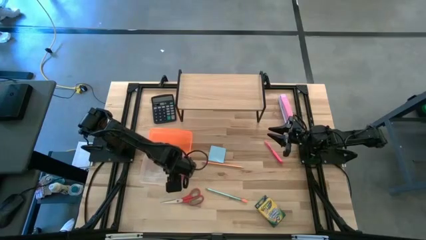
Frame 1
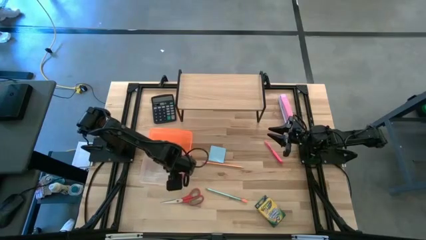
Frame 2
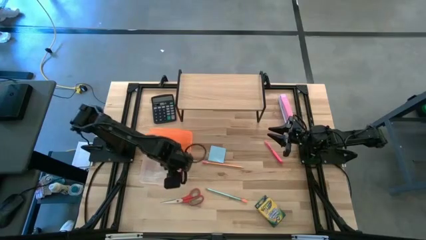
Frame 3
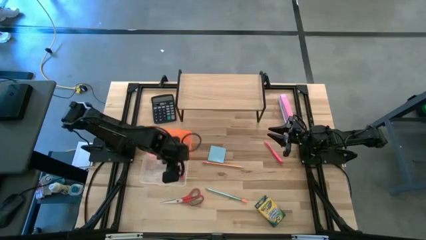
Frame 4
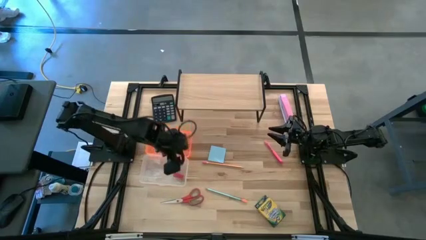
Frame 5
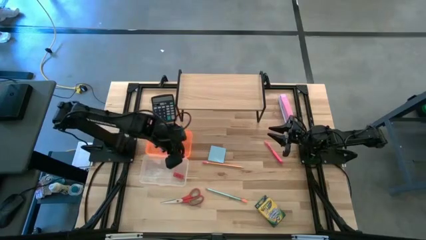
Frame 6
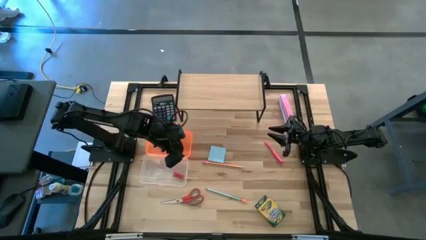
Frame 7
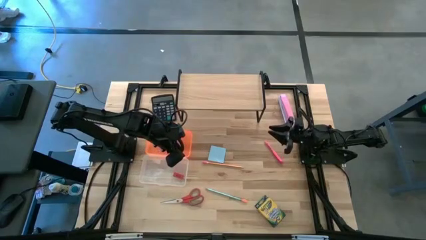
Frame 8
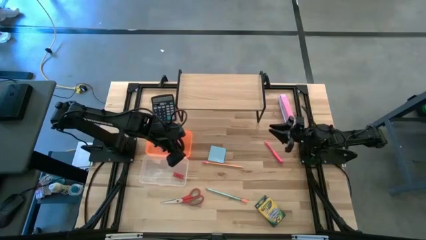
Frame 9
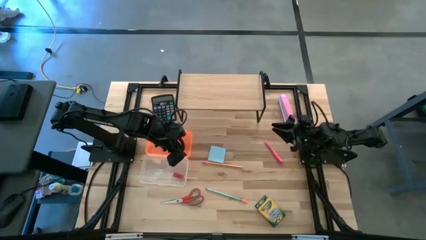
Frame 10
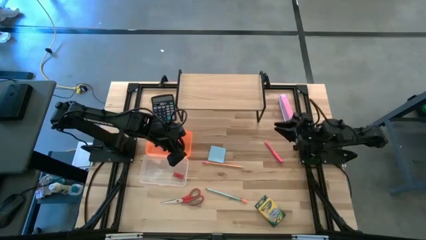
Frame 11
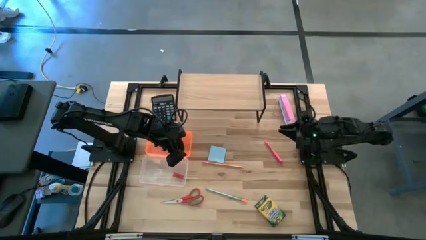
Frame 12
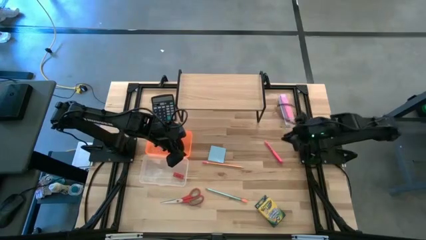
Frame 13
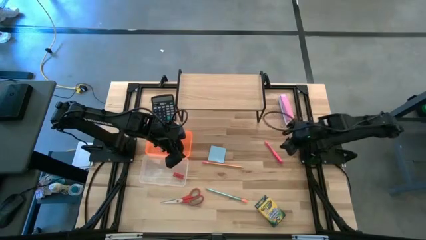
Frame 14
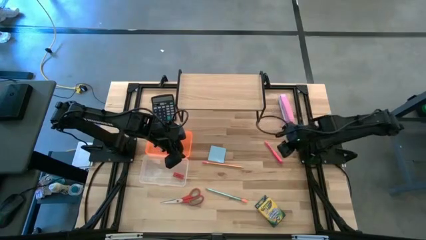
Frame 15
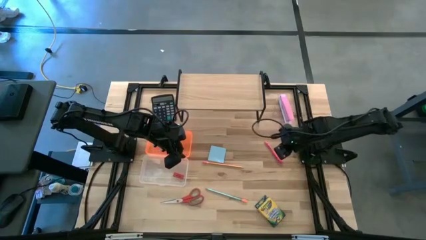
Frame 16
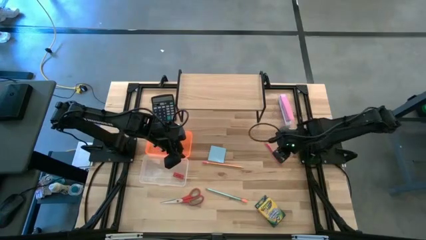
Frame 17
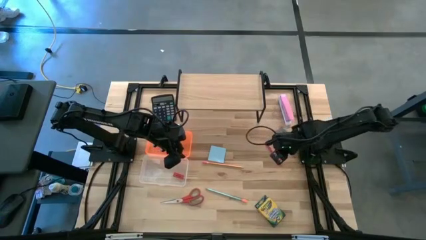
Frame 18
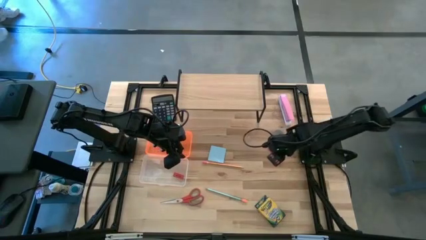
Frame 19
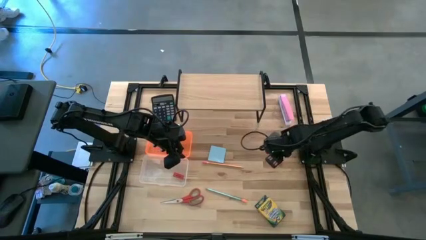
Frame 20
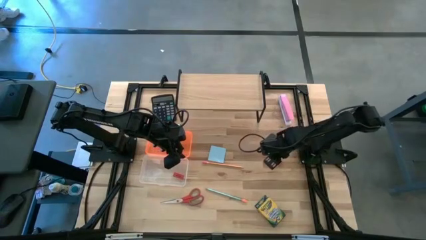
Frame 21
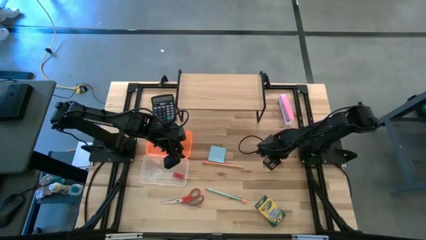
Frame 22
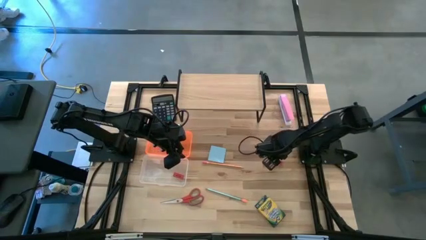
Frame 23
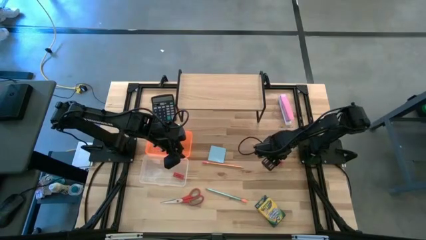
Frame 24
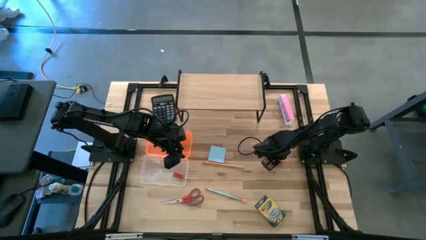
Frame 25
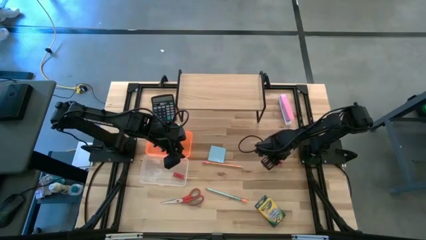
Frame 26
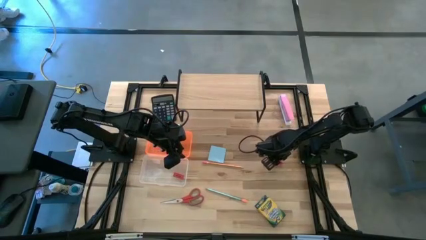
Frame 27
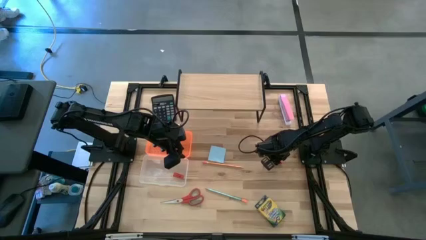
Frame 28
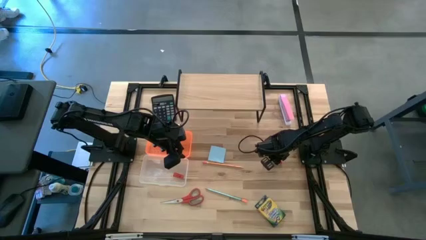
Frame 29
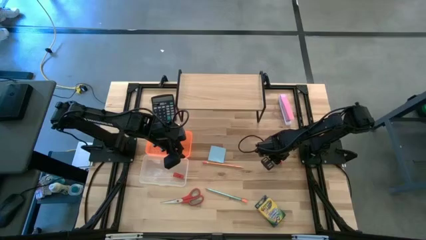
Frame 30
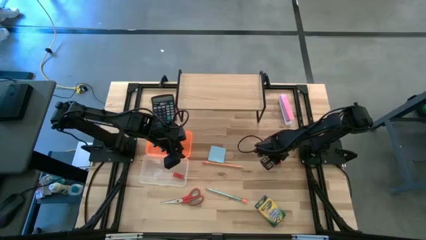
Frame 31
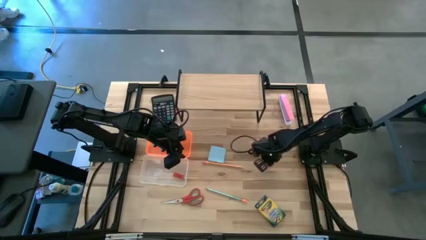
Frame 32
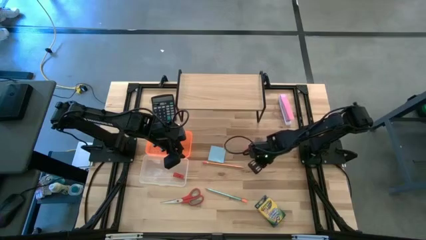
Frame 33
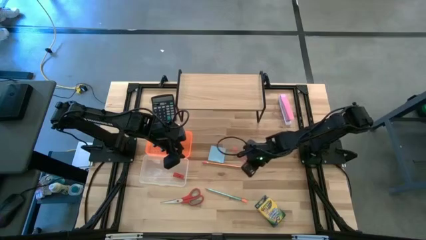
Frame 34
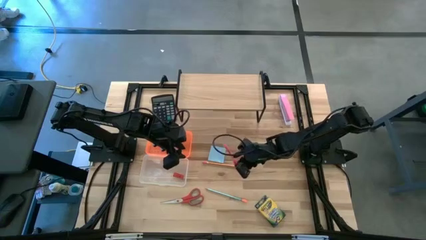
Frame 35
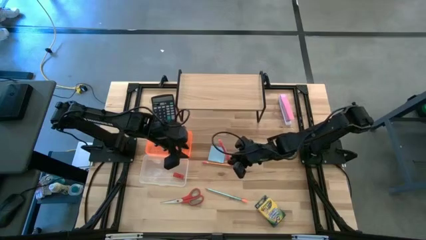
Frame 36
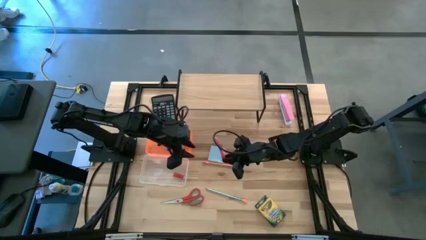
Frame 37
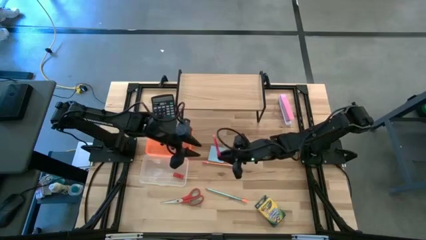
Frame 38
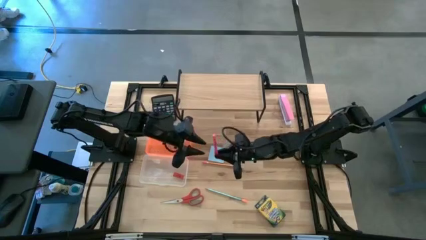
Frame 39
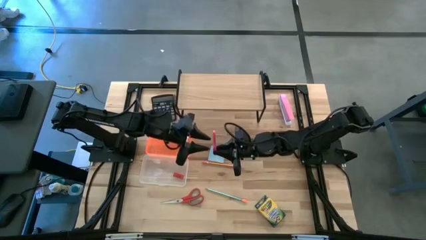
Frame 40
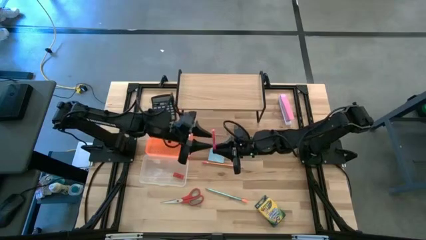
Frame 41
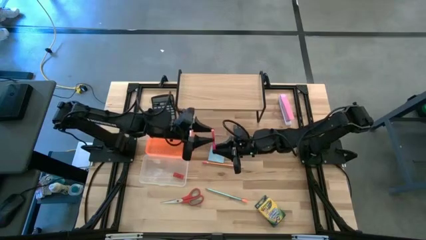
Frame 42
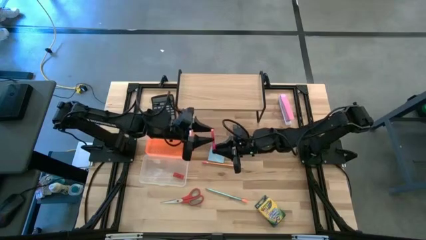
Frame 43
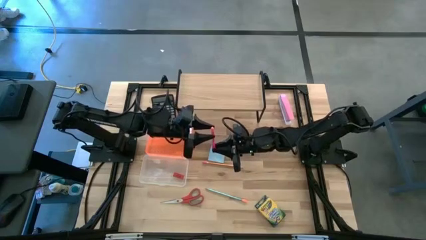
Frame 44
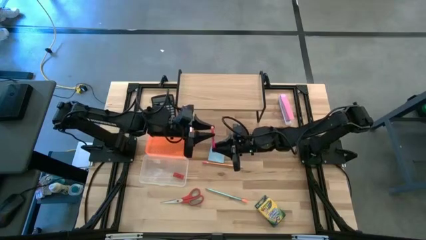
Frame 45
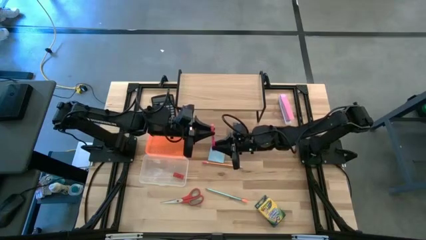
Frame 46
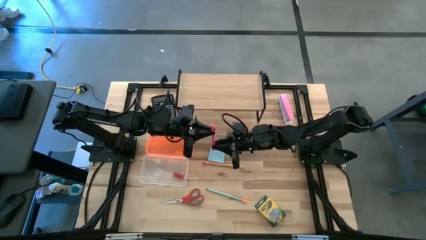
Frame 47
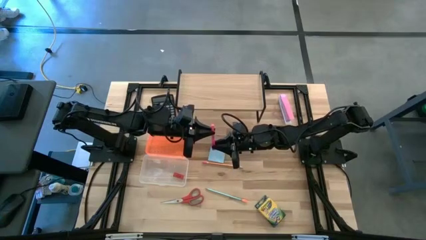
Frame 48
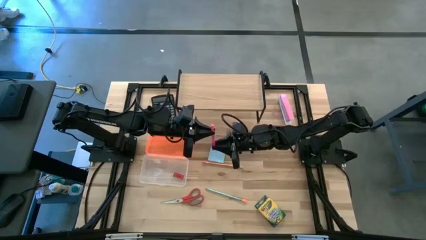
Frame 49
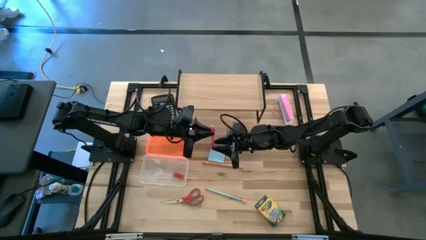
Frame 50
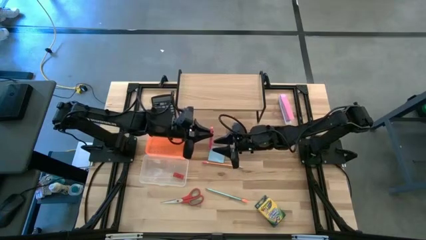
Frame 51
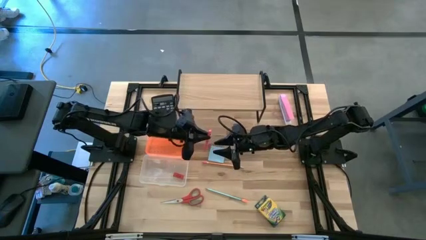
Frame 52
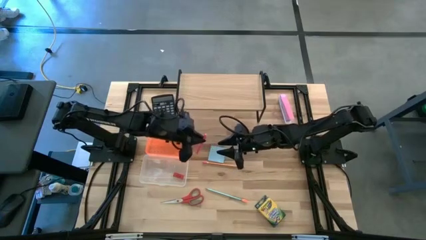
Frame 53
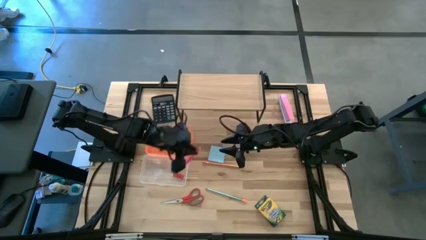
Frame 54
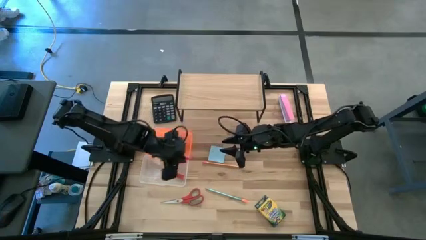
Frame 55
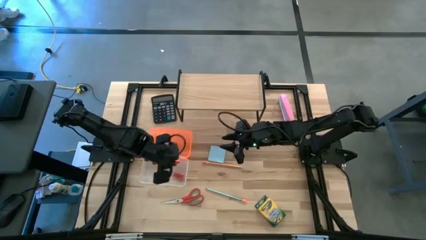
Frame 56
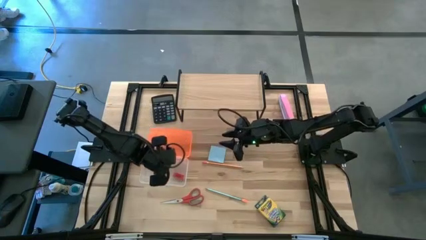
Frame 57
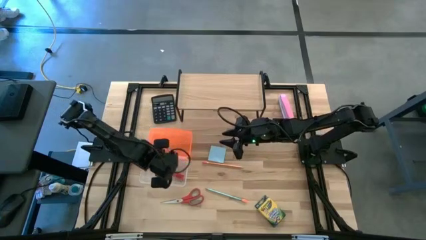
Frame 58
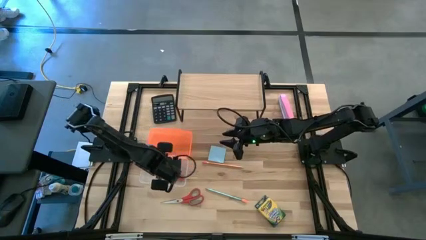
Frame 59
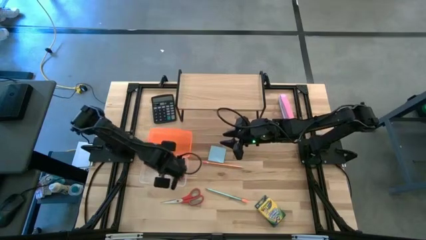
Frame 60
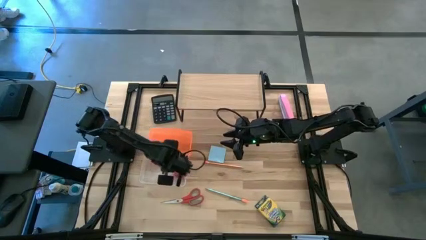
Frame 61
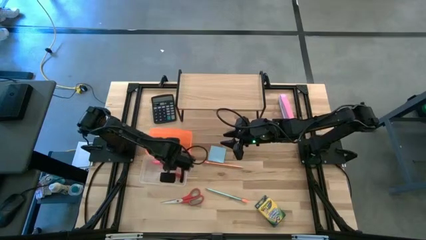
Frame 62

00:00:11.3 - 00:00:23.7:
Task: Pack school essentials
Put the pink pen into the supply box
